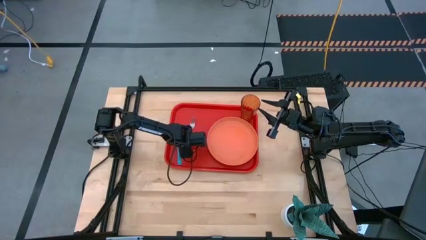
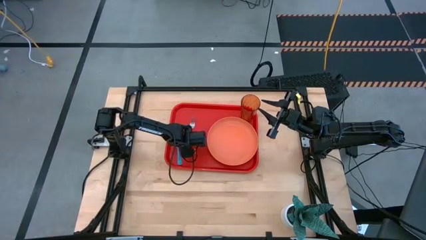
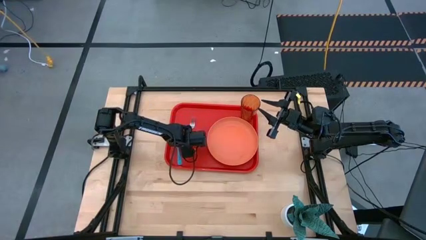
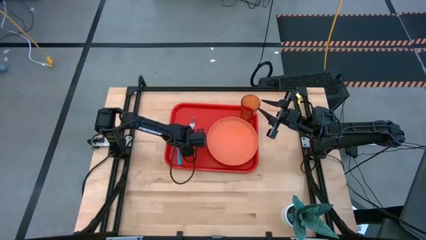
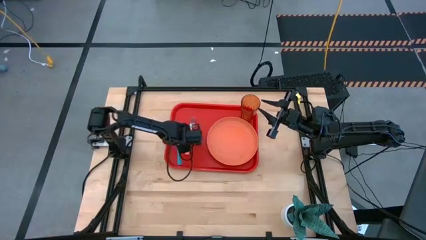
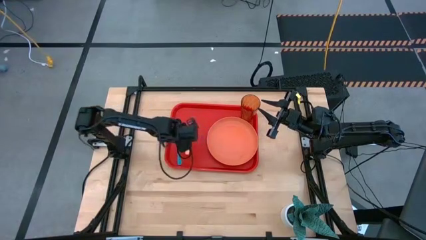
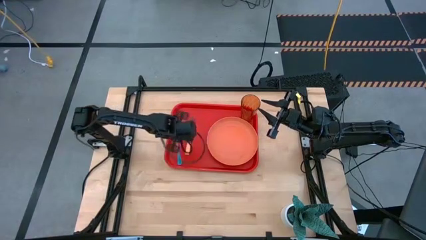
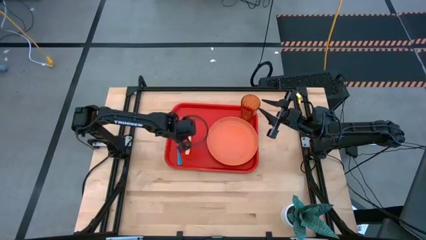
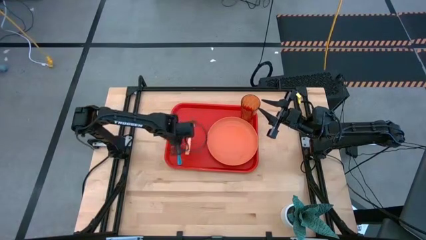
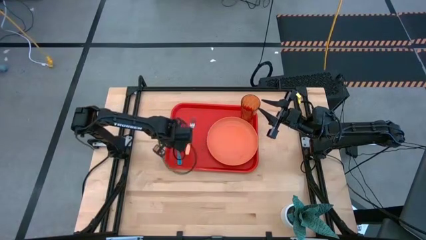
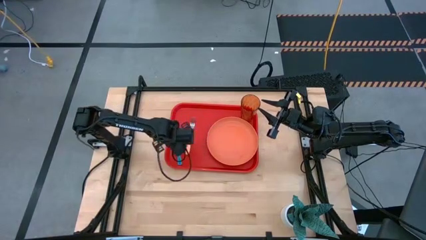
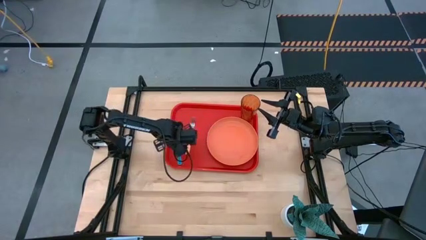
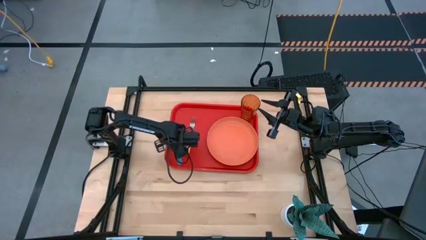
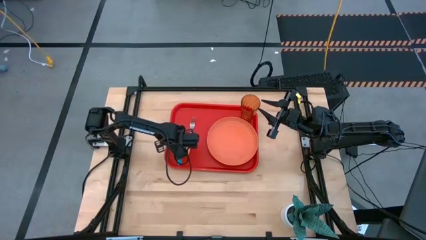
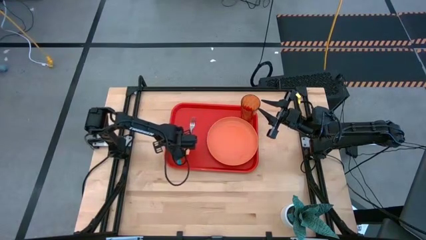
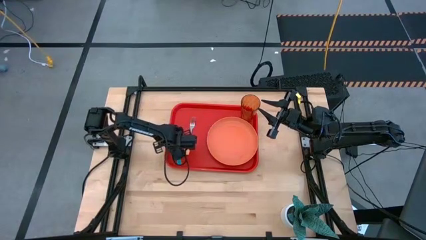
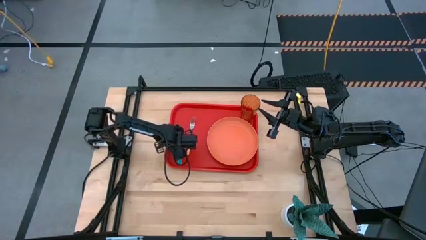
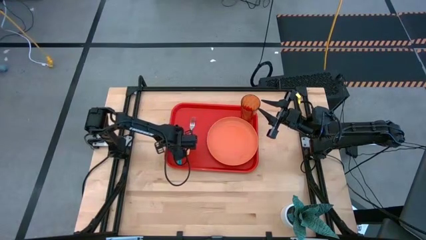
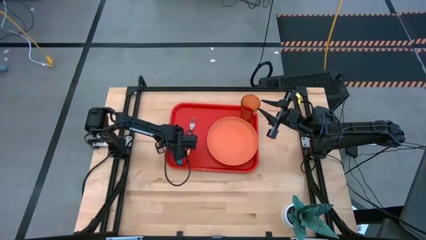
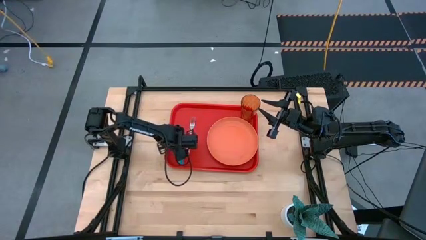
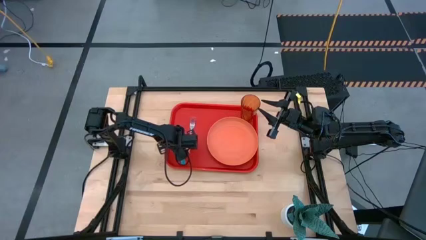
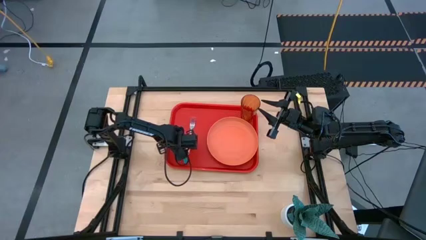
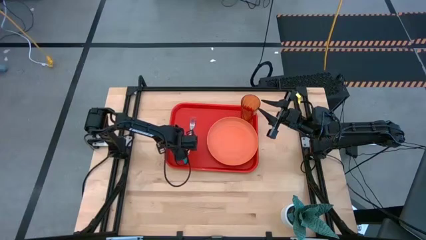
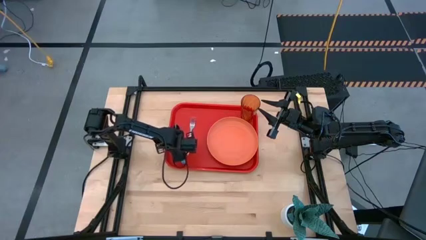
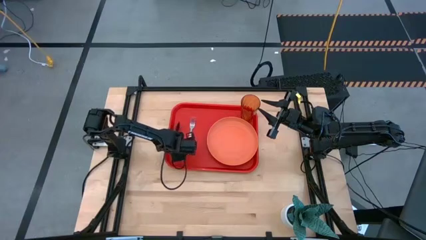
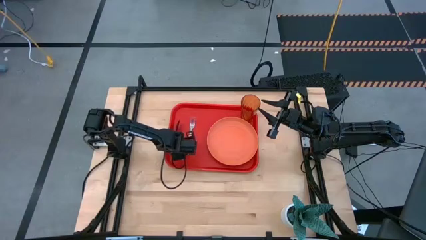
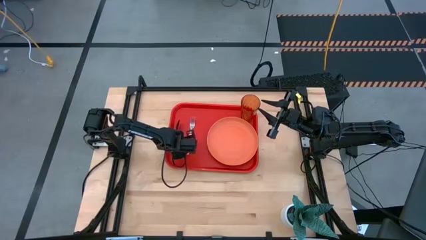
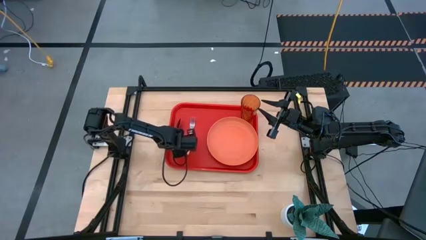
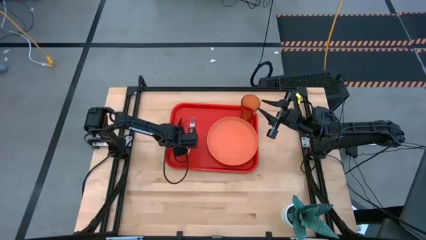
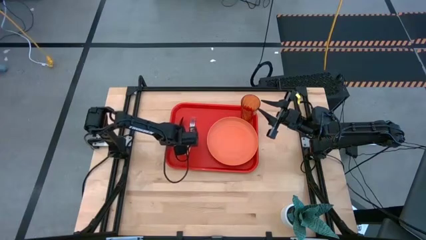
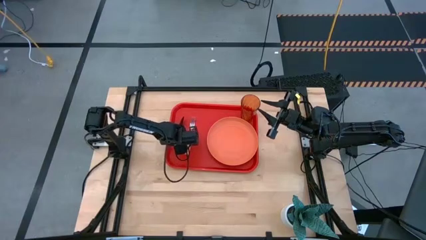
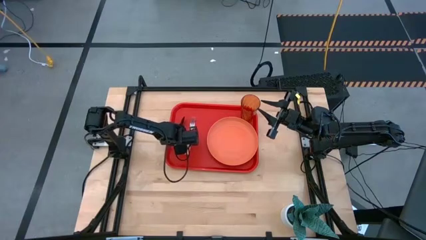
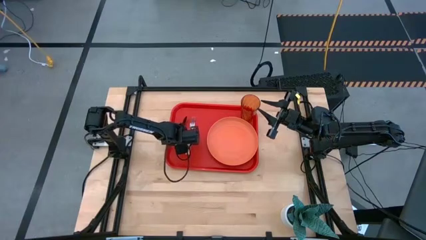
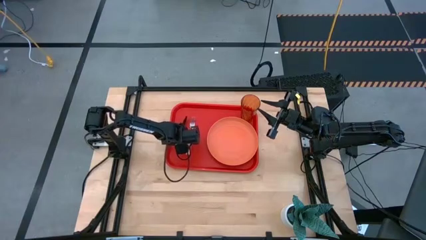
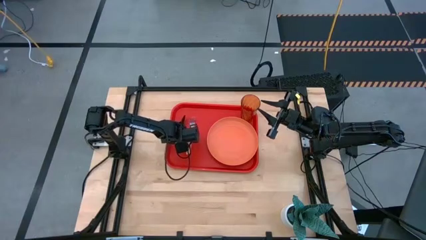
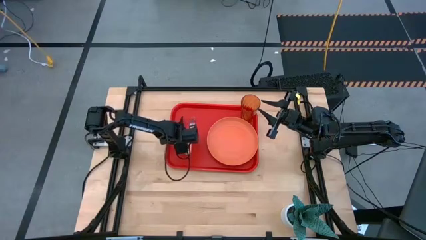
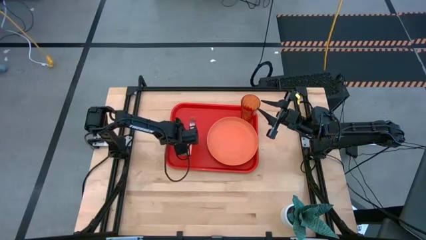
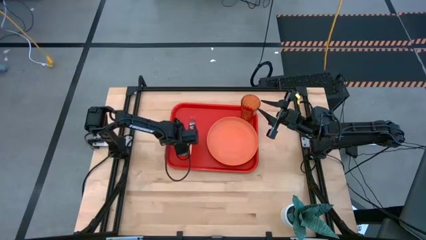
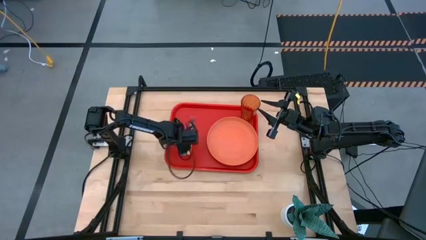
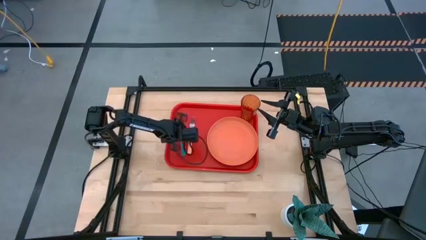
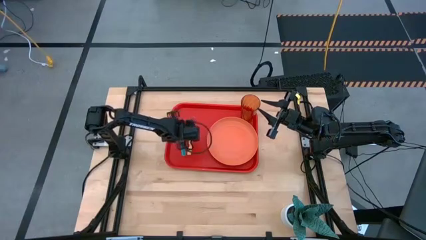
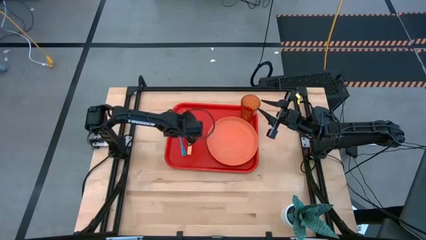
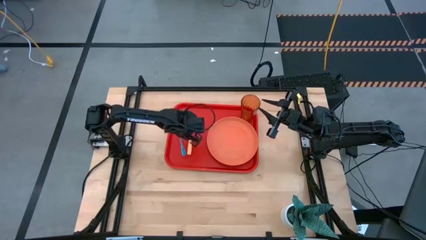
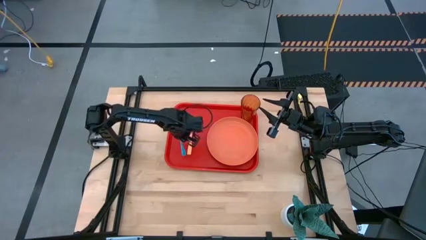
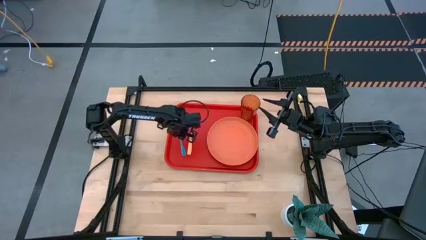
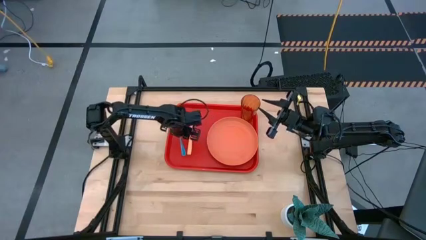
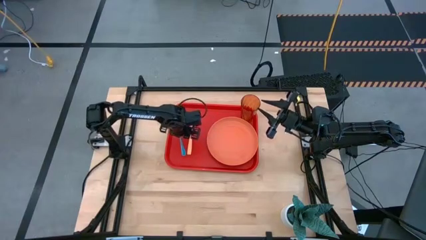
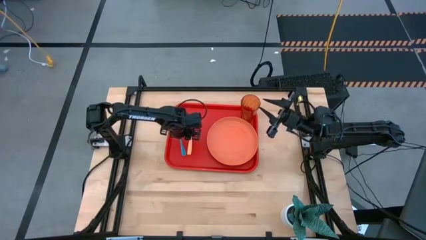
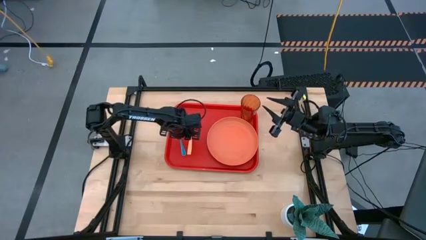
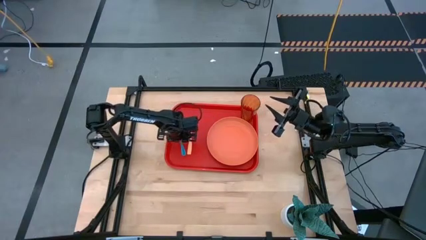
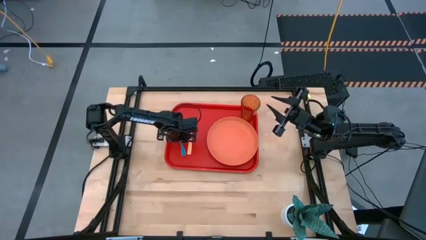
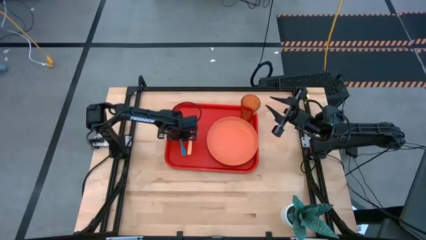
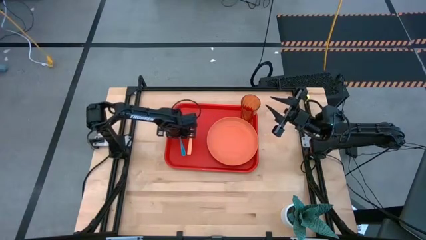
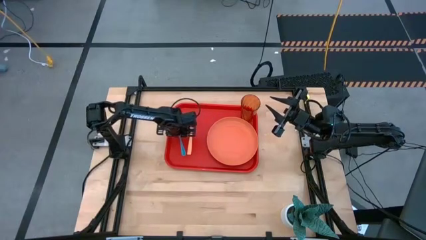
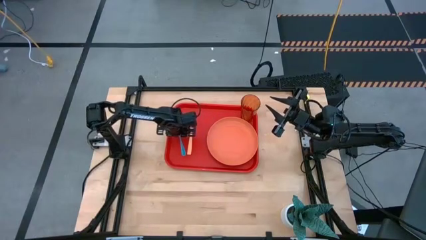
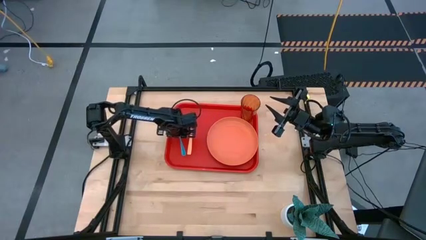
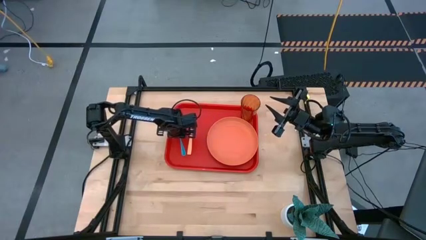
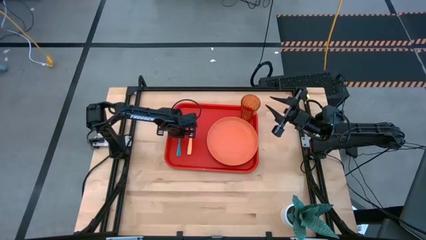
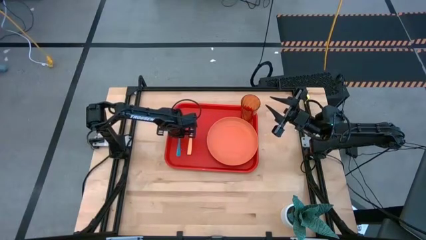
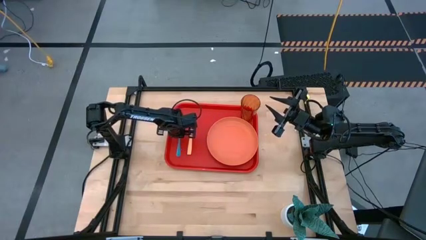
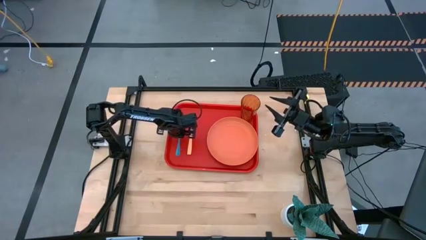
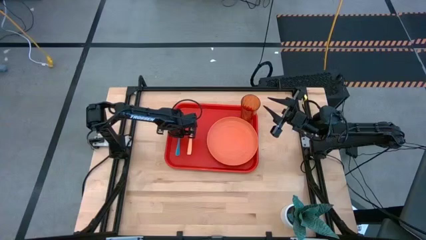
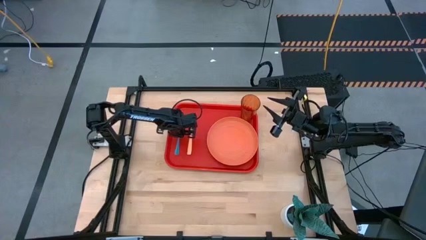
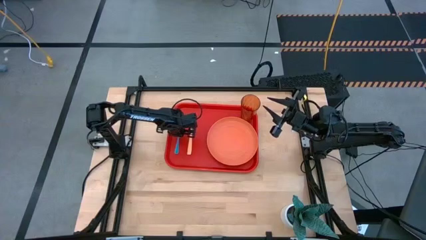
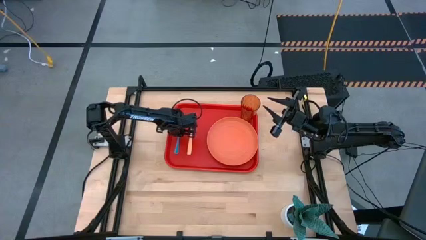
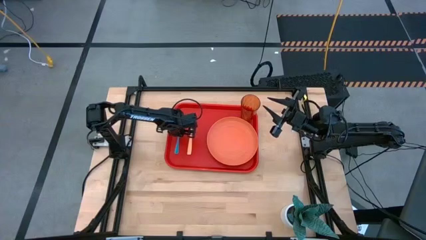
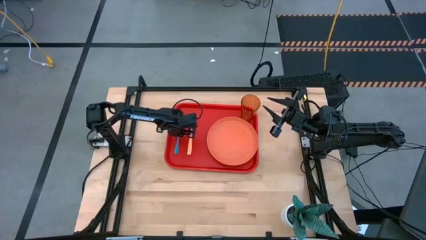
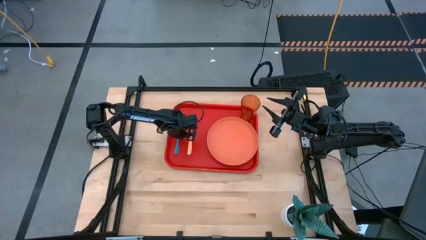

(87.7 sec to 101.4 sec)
Task: Pick and place plate/cup/fork/spoon on tray
Adjust the blue spoon, orange plate, and the red tray

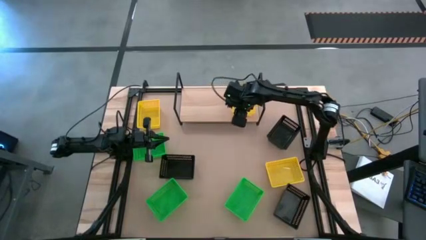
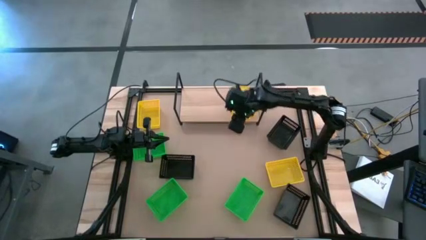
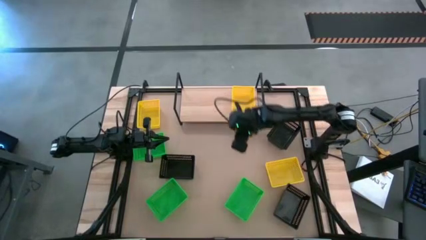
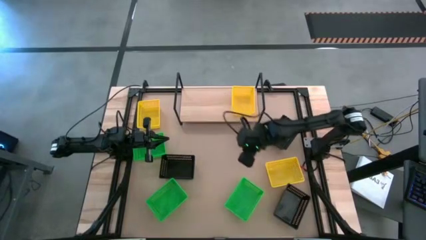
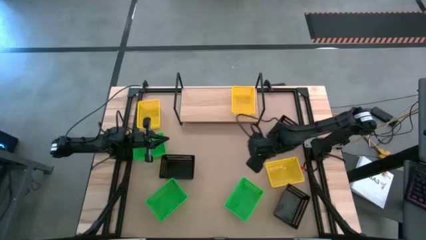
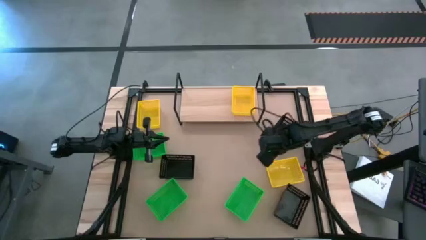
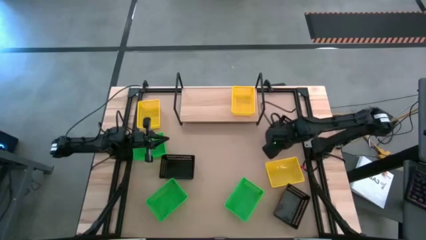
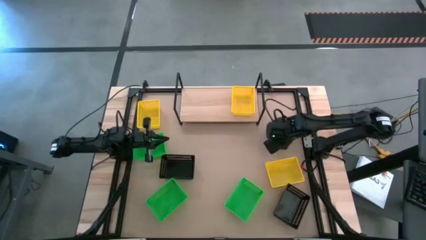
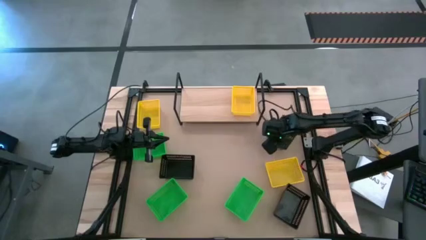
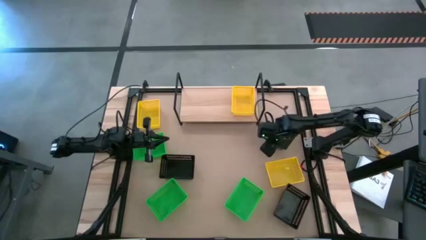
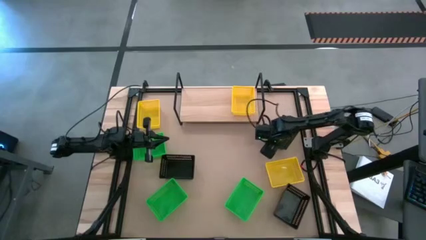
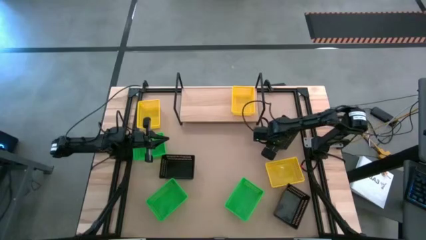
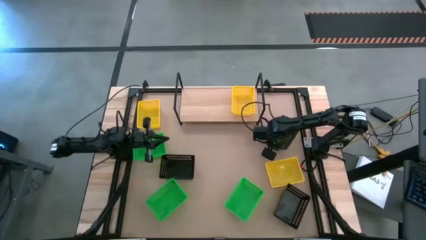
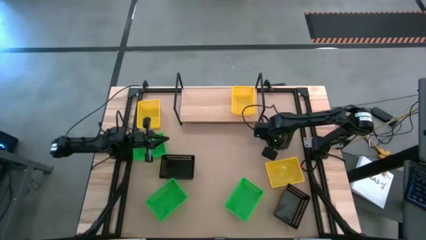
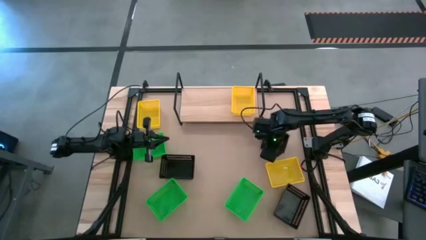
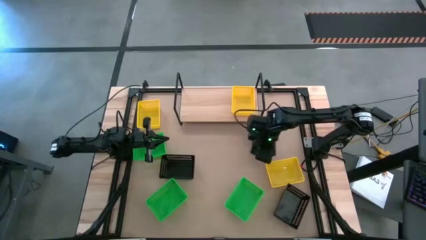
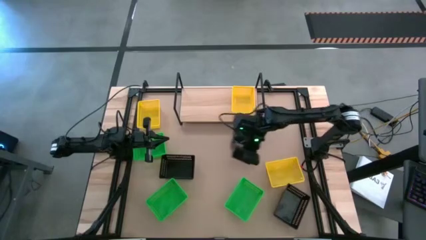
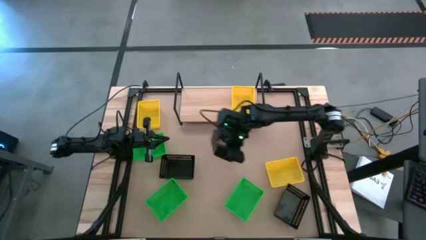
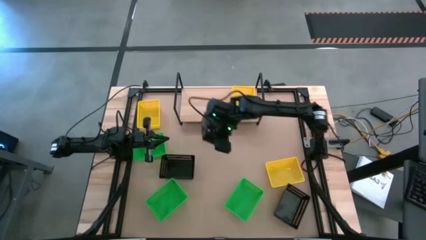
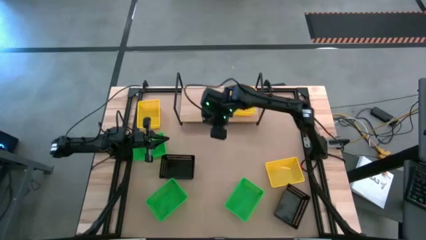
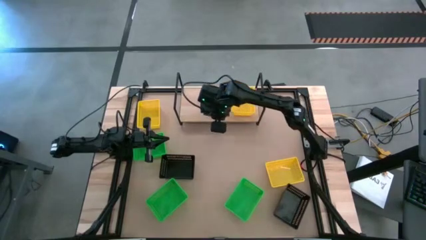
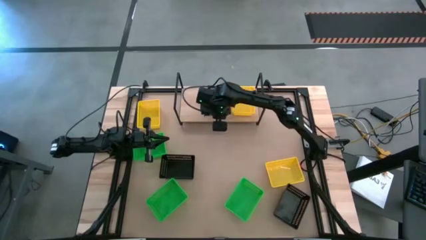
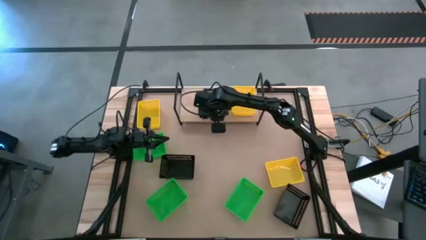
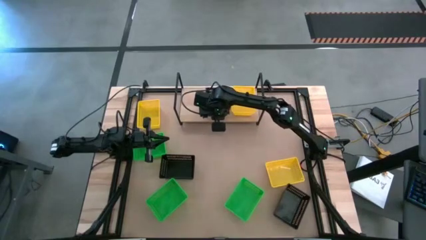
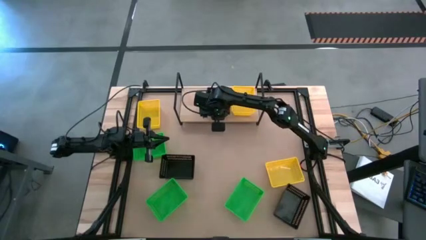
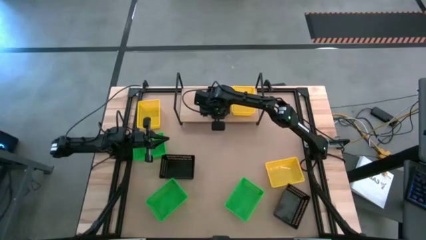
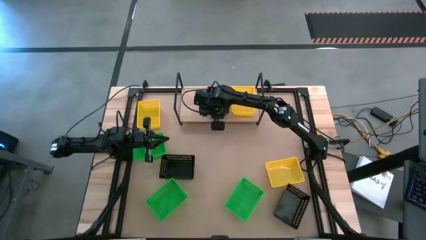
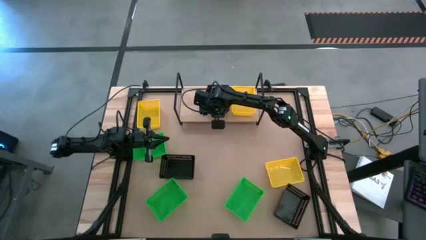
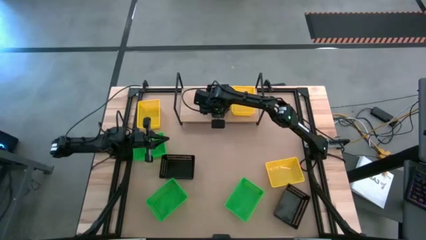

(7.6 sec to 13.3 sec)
Task: Stack baskets on shelf by color
Put the top right black basket on the shelf
